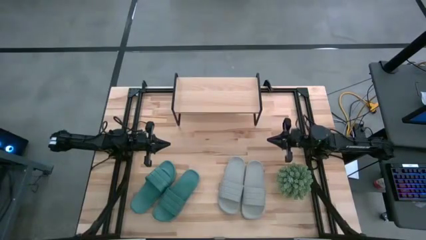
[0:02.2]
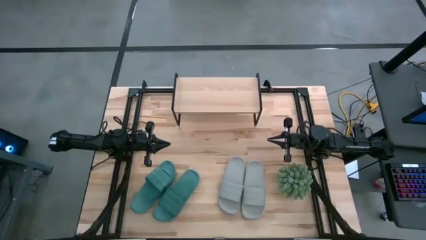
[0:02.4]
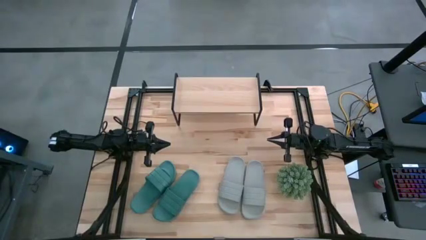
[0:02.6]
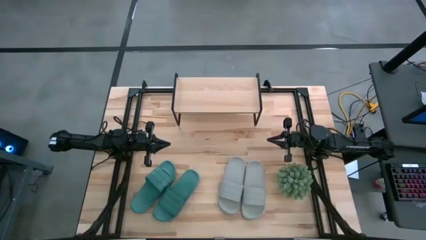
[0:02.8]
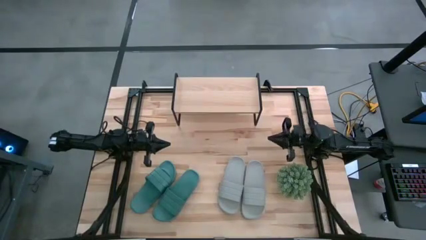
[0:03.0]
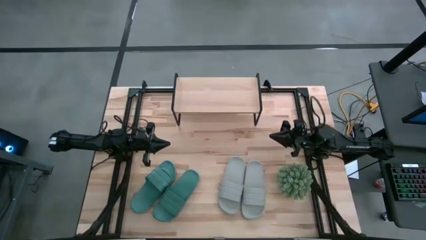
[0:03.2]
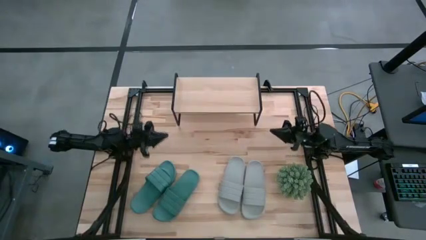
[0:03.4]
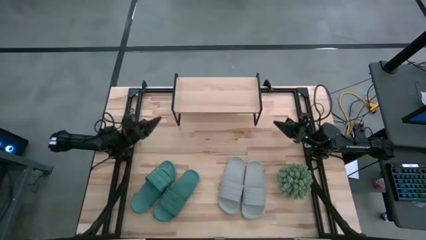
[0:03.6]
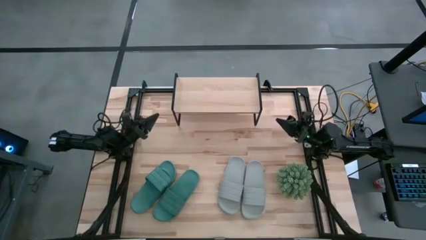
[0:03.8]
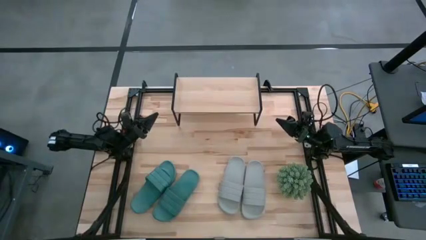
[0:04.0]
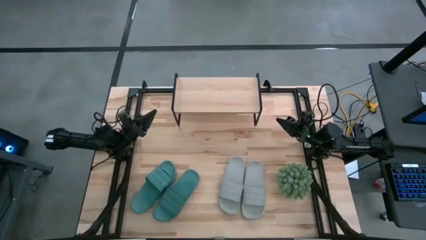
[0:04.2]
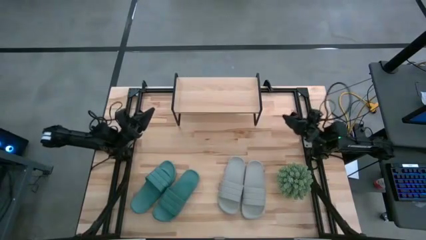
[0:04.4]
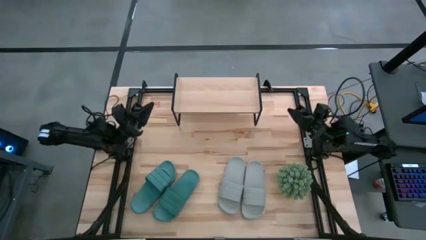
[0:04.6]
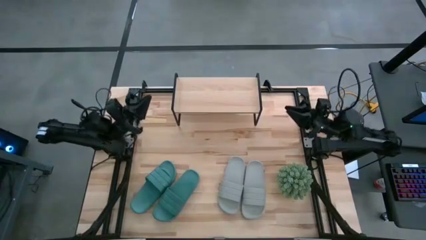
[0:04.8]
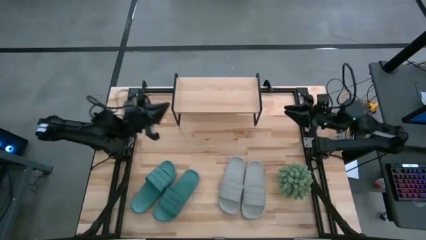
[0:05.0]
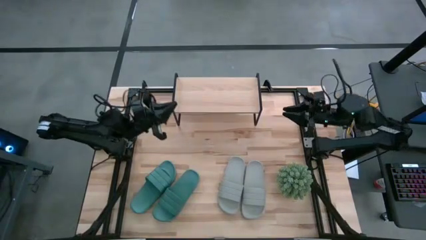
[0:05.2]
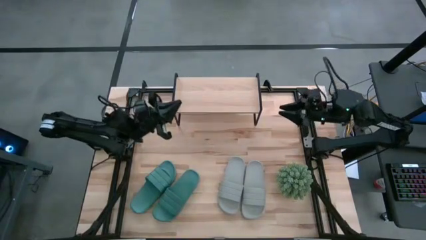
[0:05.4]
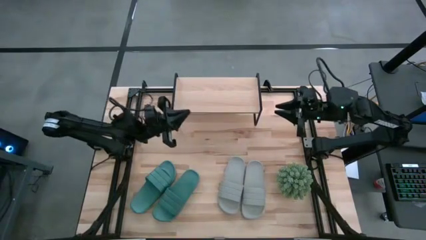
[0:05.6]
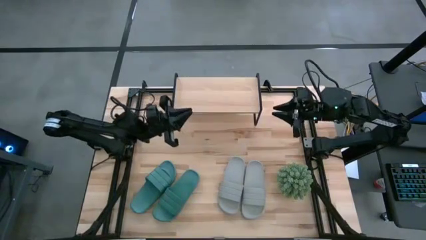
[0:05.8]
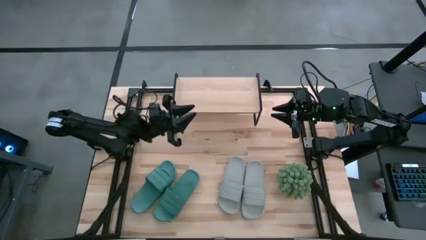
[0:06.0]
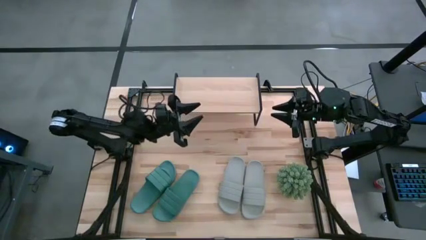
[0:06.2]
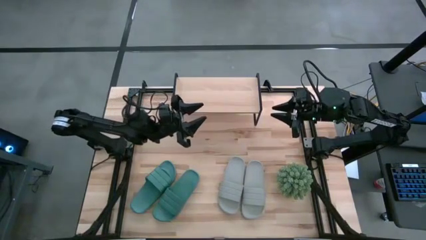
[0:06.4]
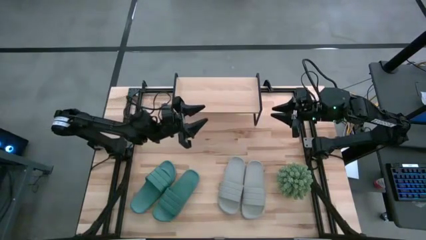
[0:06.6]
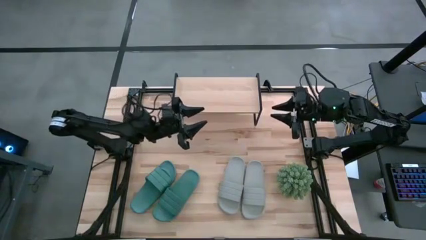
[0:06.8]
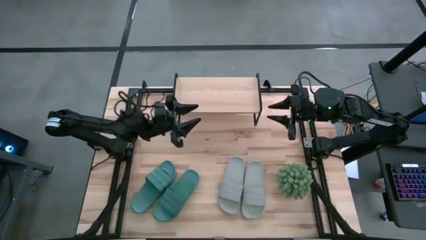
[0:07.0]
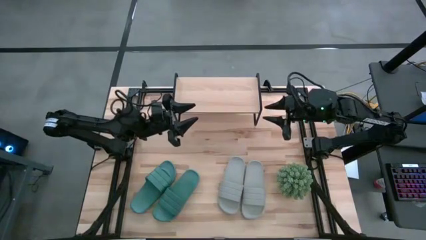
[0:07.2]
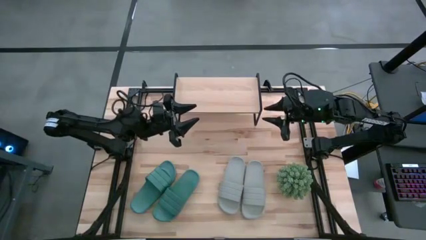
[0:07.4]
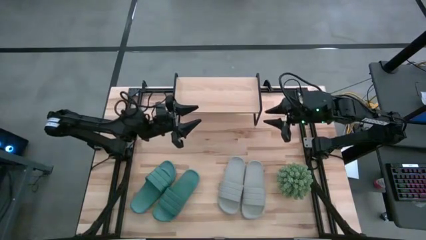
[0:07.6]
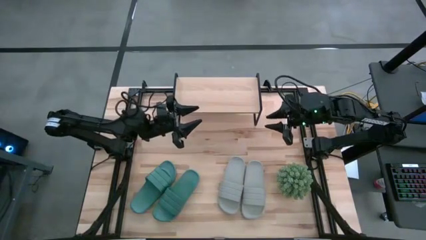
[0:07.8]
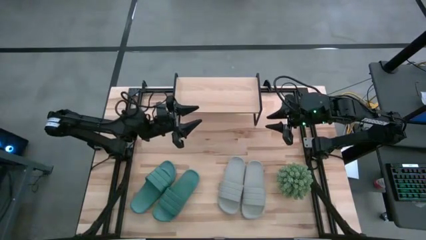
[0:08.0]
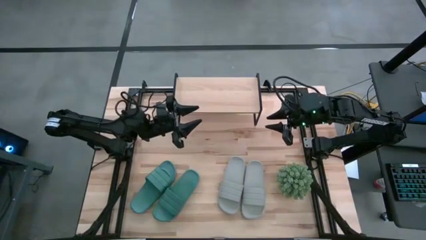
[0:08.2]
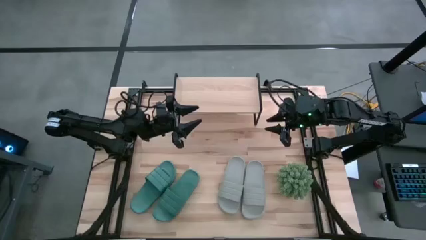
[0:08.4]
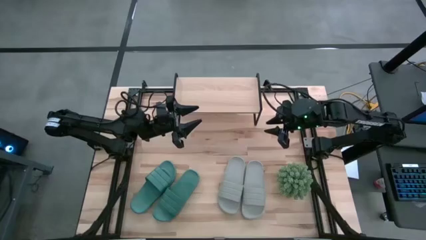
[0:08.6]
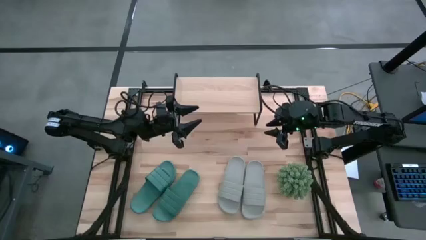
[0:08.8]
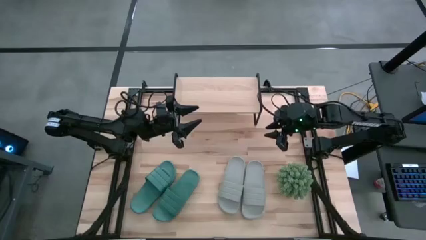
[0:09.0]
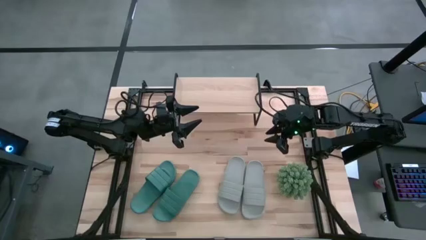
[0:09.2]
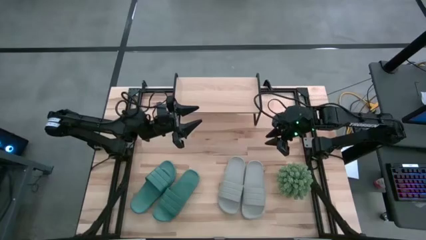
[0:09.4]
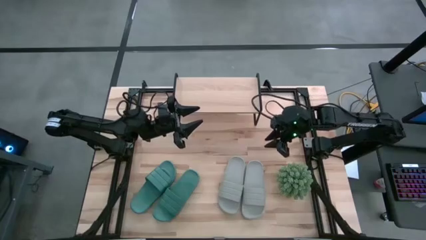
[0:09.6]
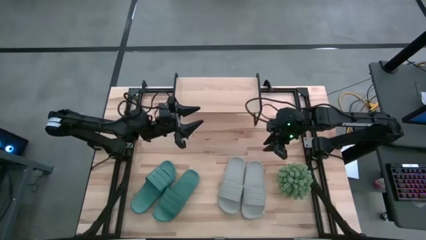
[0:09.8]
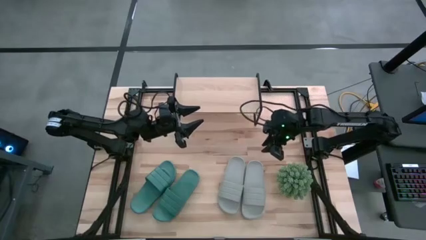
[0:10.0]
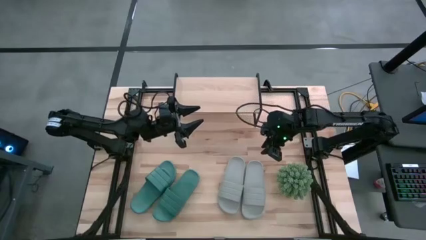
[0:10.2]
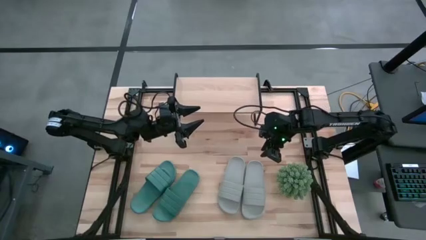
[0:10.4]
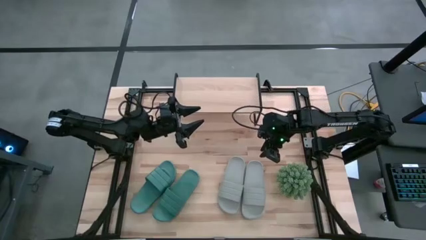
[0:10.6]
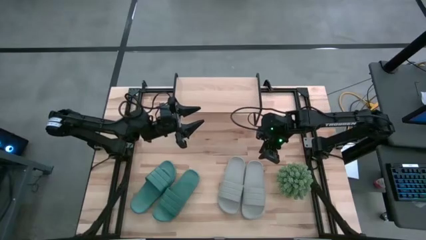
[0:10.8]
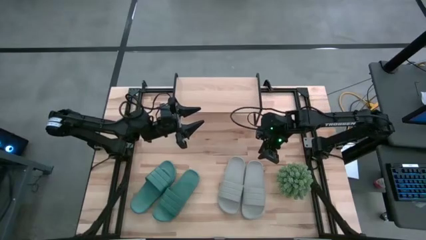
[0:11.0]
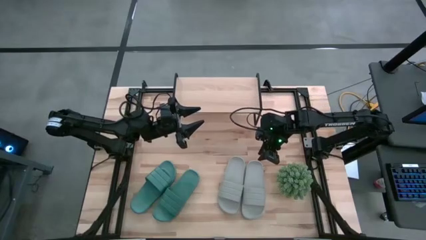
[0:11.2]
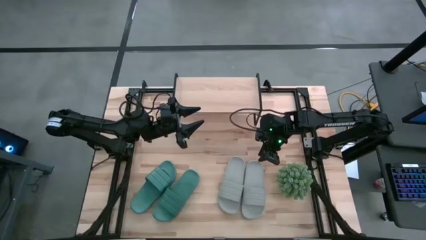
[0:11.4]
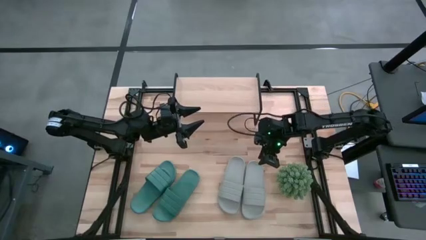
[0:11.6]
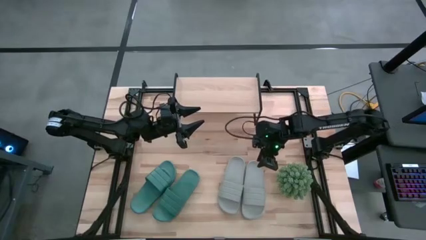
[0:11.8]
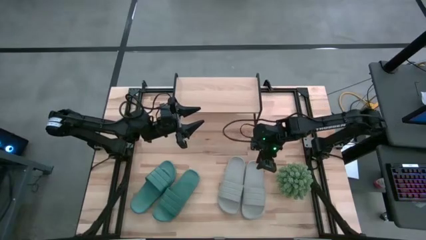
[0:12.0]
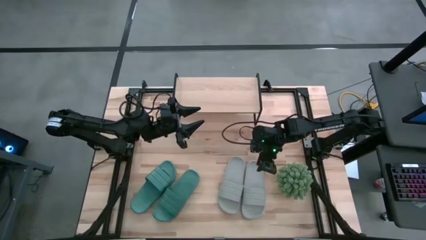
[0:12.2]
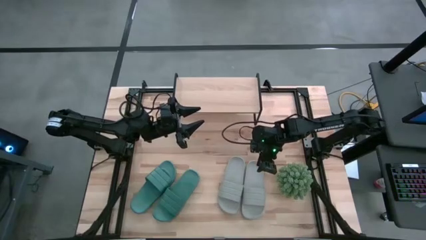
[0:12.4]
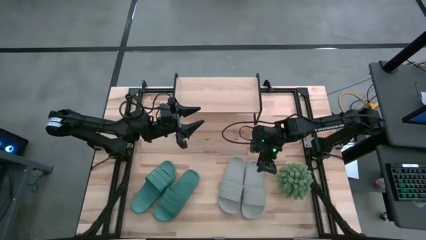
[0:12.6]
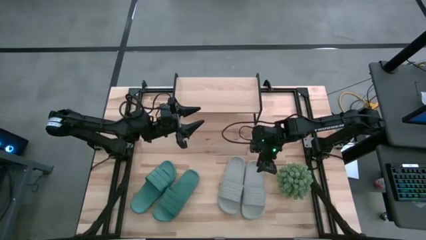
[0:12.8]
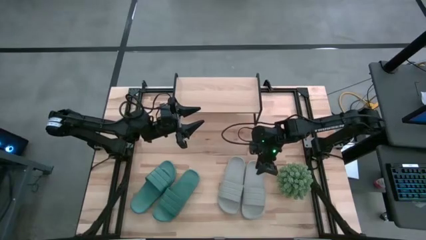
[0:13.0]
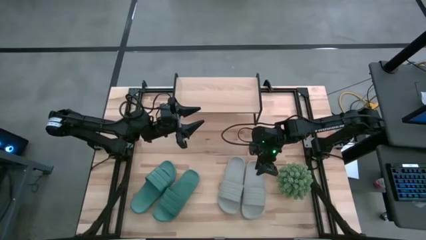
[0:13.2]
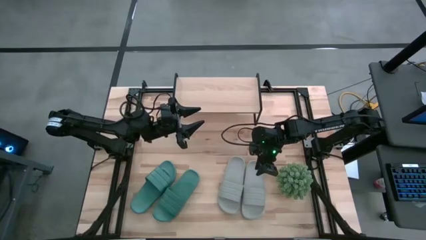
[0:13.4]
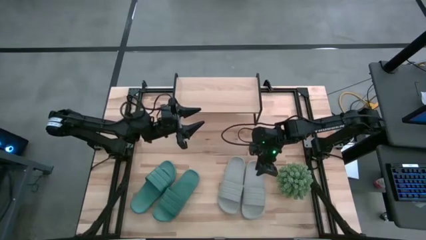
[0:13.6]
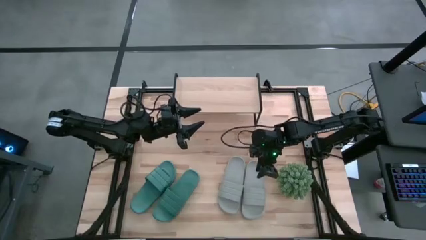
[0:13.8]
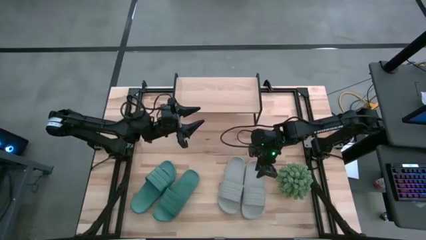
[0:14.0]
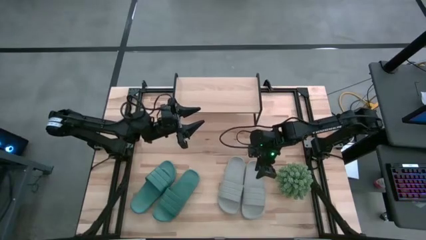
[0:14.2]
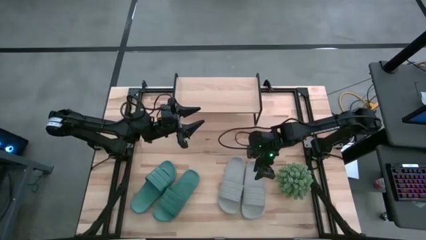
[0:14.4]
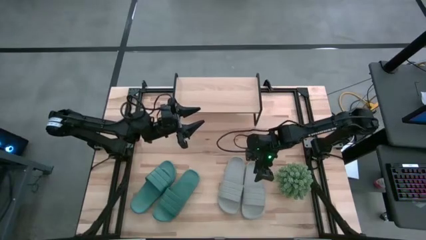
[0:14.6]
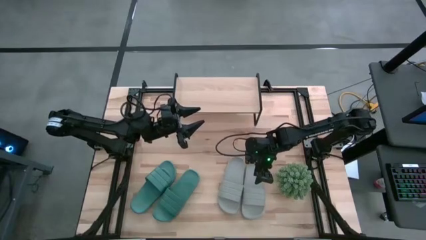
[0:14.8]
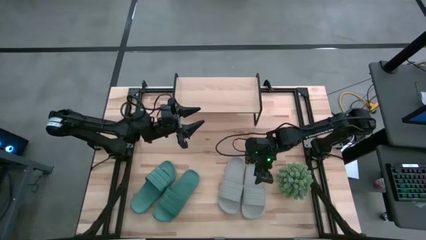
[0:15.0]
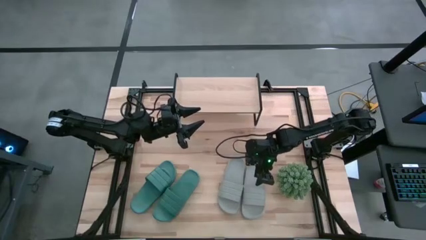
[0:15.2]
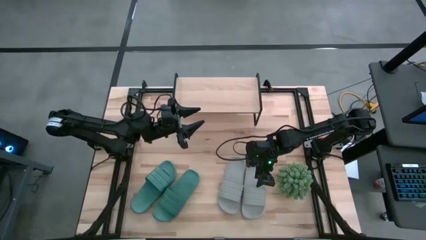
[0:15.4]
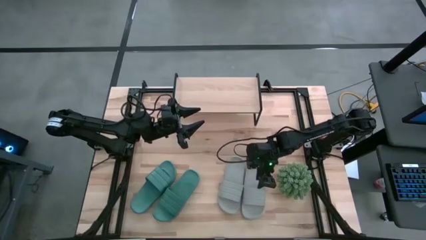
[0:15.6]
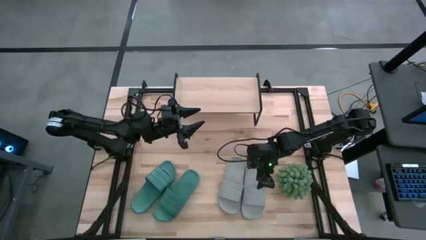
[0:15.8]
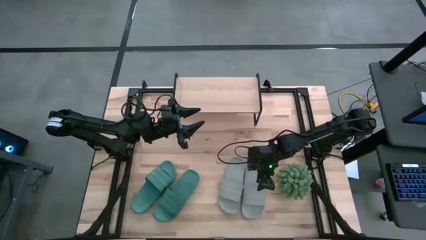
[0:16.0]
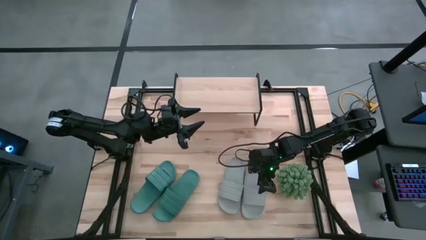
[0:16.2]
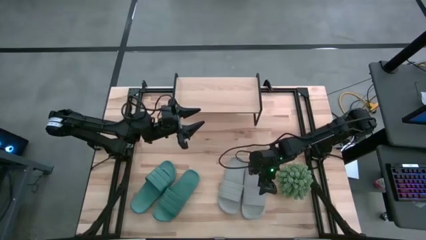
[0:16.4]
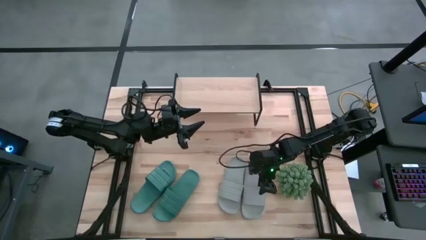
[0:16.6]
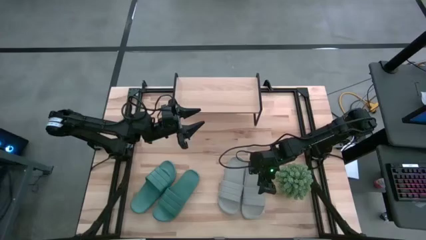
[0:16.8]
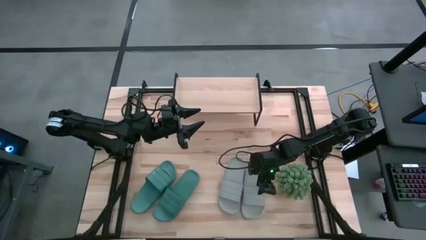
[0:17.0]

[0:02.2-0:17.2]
Task: Pick and place slides into the shelf
Put the right gray slide on the shelf
